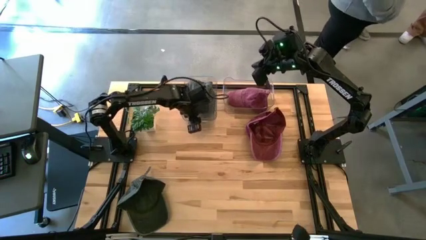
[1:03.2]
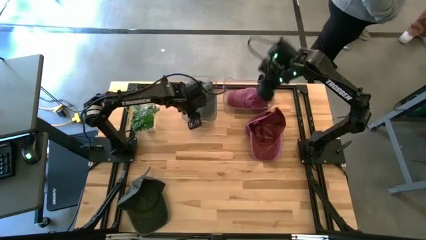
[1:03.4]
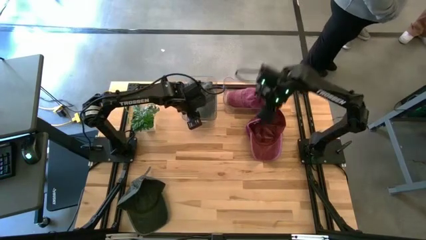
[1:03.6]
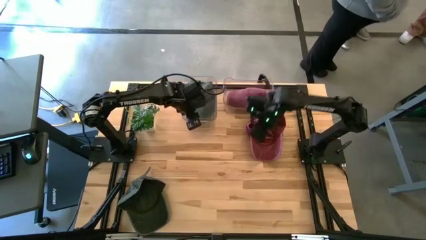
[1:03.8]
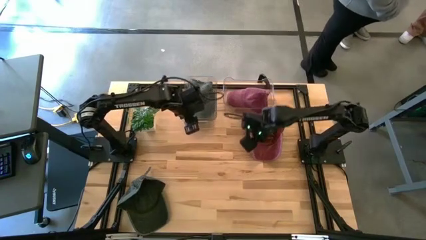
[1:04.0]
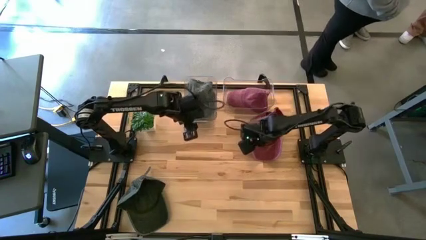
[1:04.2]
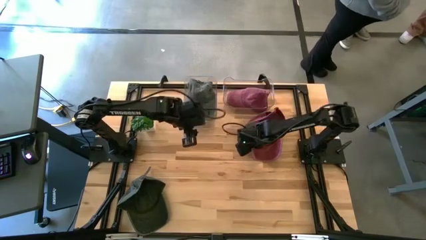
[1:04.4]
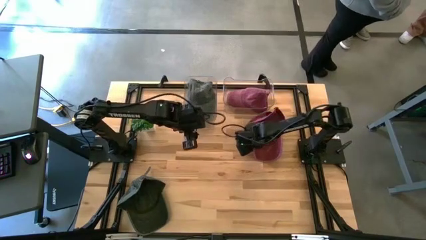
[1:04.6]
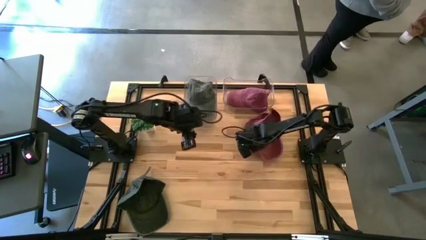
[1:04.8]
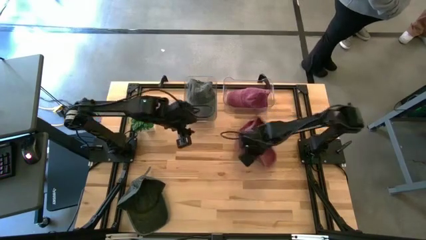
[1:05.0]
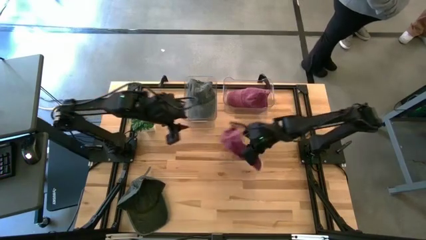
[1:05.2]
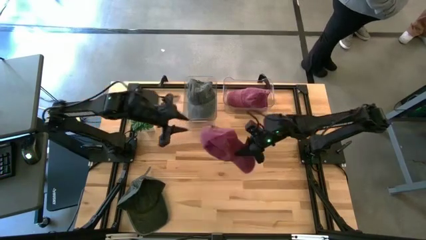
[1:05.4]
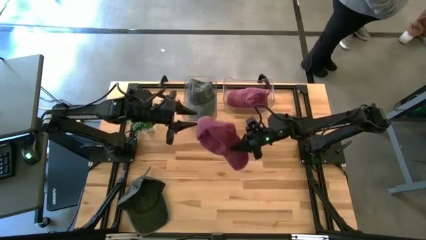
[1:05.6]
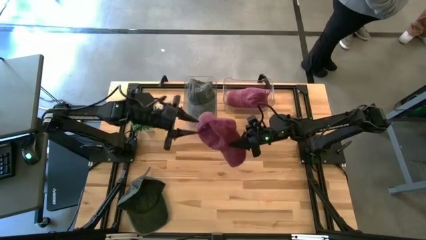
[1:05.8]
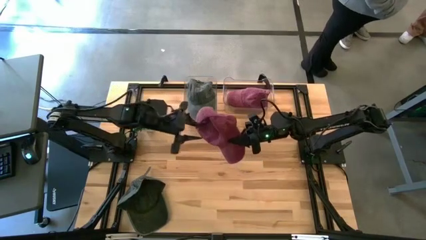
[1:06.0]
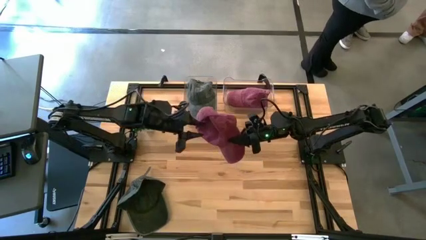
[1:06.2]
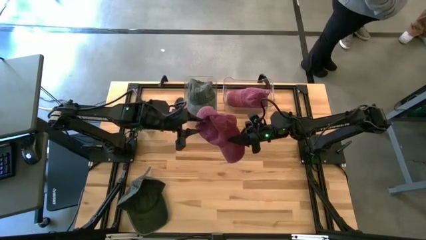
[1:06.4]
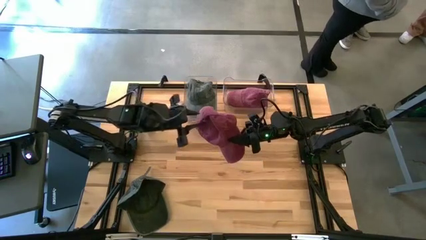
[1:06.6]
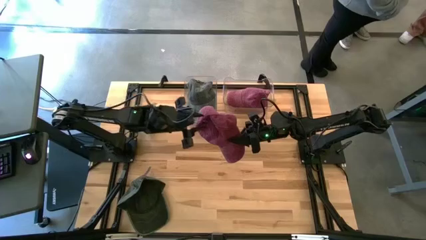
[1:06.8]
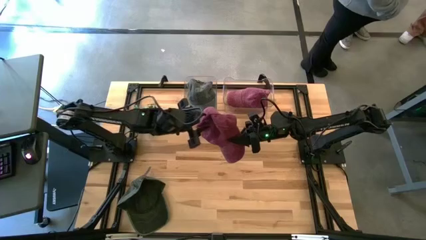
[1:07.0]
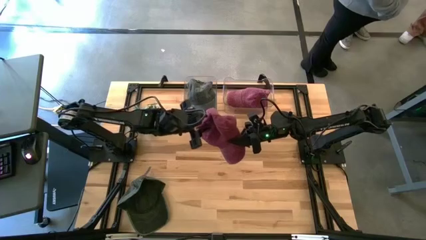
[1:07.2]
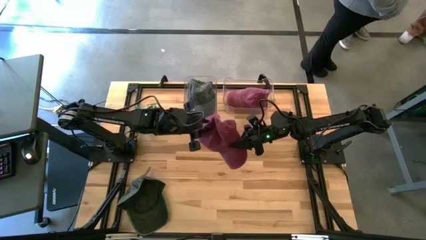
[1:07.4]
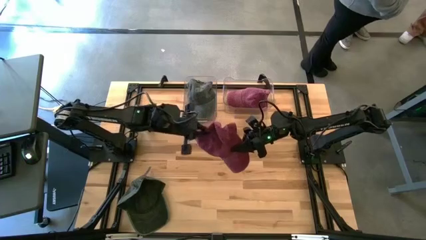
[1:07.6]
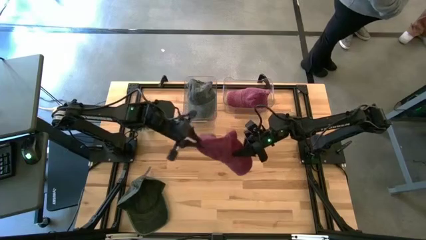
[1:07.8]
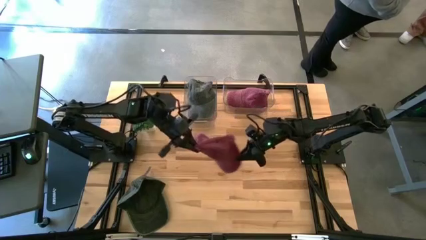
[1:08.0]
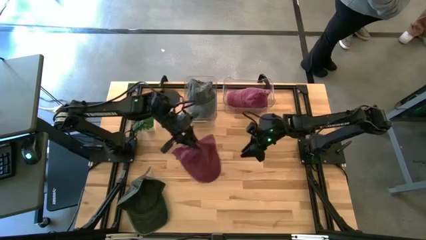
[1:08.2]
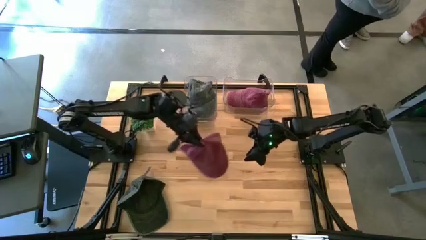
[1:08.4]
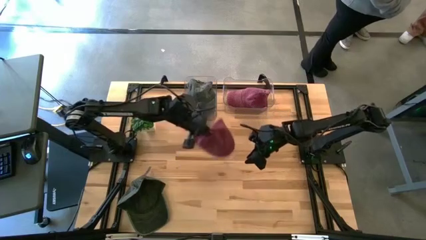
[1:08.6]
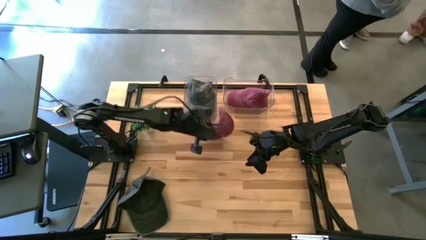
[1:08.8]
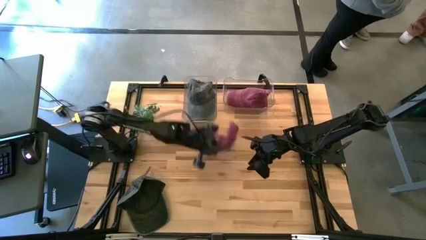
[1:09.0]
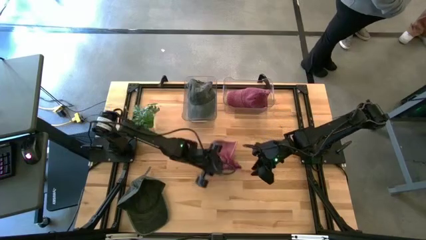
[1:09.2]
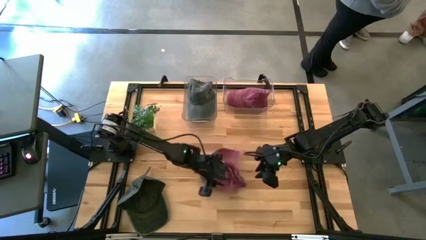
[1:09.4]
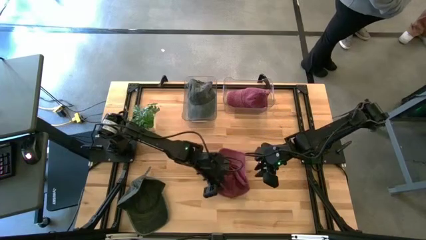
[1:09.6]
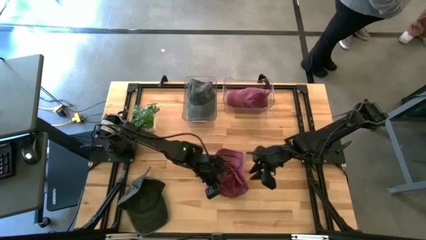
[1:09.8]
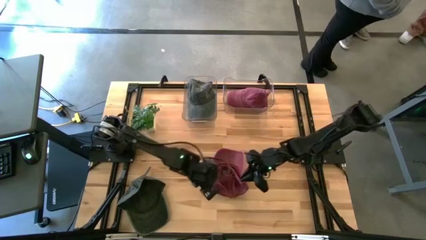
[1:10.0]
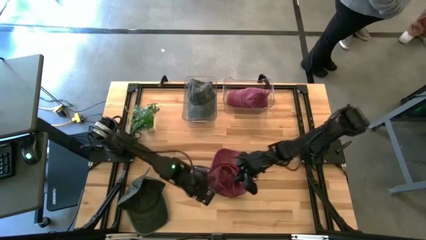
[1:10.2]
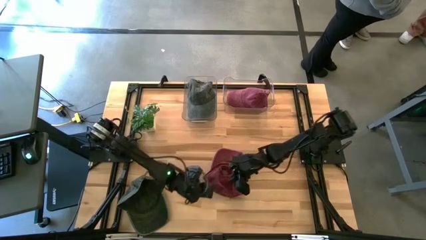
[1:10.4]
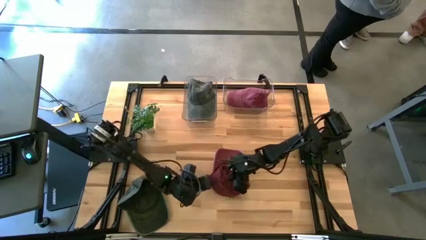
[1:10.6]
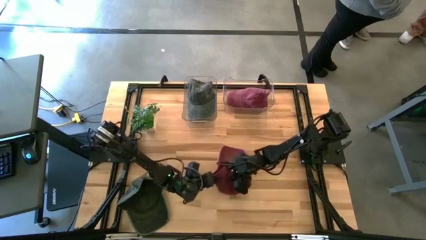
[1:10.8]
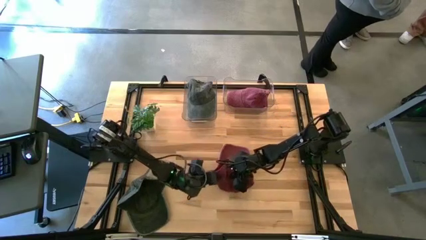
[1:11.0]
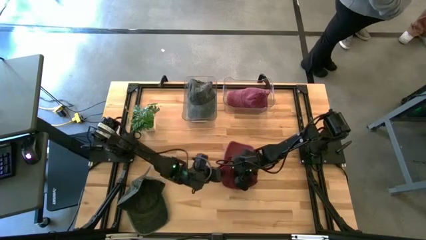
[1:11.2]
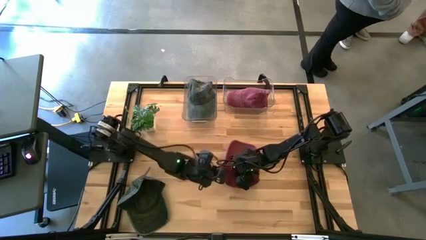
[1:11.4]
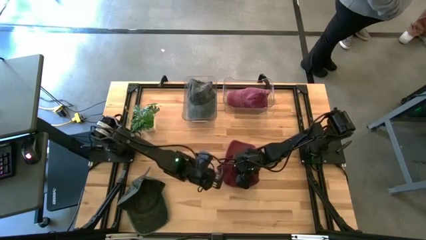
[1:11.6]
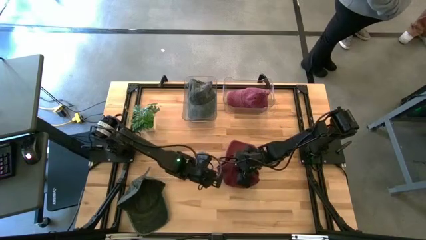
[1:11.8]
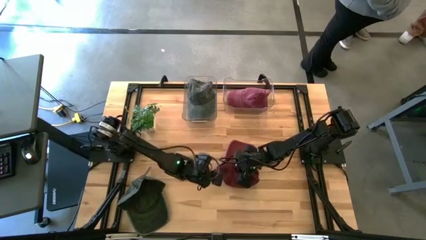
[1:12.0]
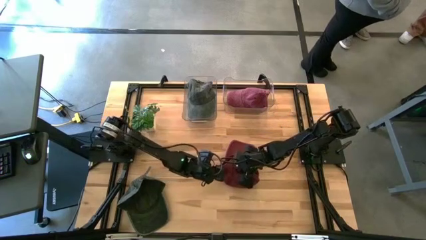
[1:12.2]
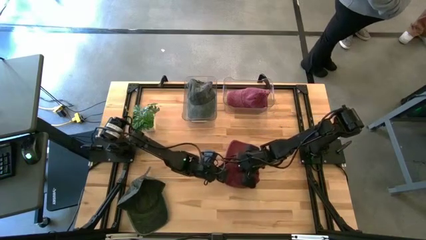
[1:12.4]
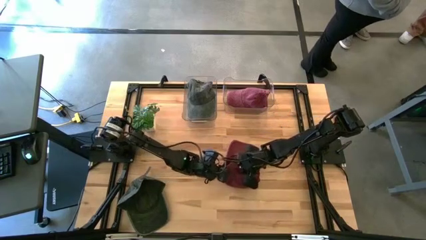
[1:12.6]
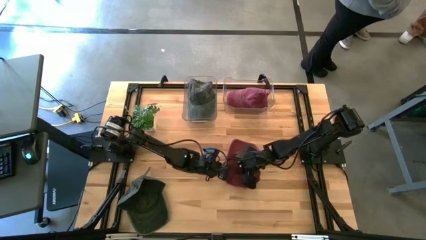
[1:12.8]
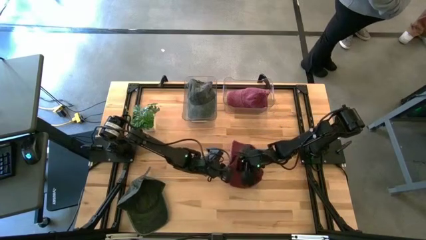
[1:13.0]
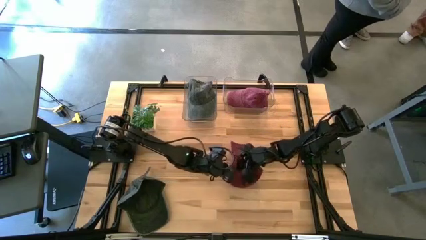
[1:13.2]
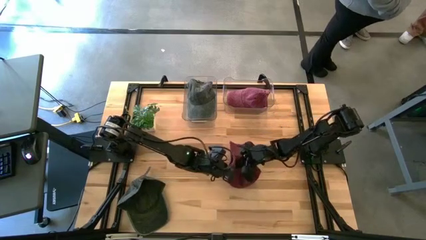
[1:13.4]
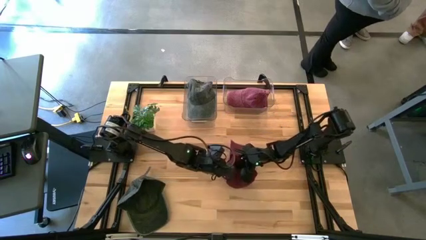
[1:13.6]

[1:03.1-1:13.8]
Task: Pick & Place hat
Put the red cap into the right transparent bin

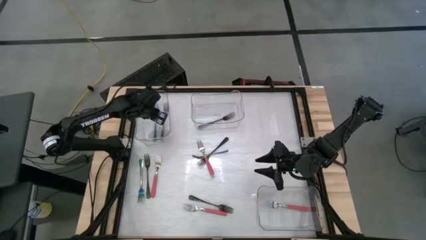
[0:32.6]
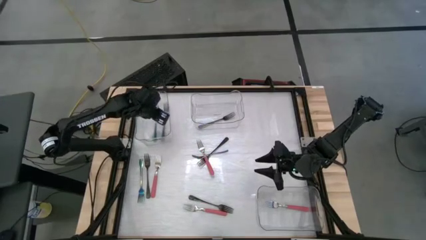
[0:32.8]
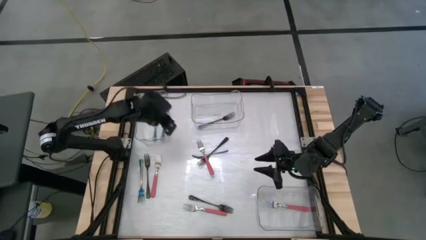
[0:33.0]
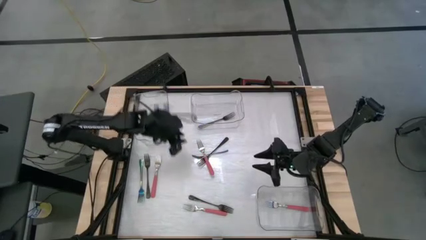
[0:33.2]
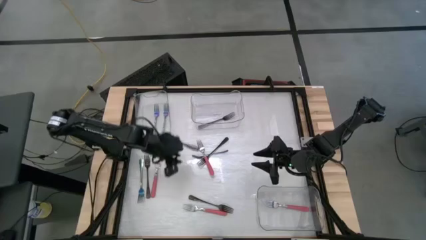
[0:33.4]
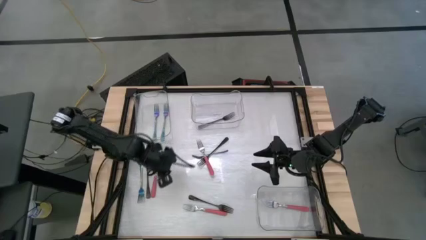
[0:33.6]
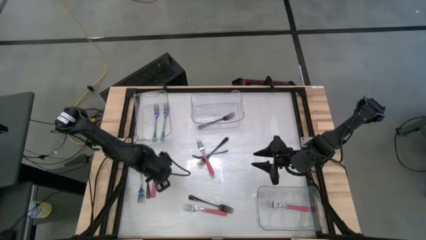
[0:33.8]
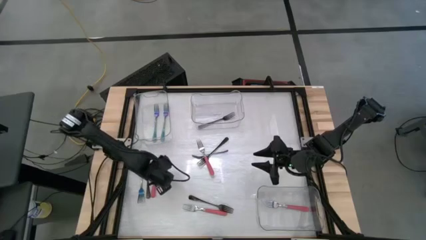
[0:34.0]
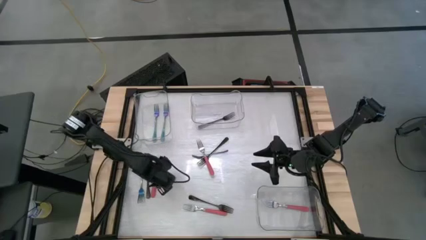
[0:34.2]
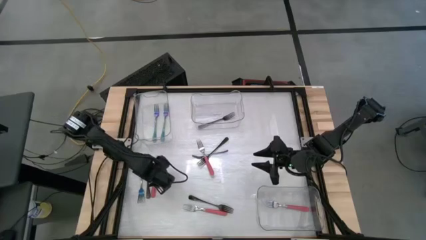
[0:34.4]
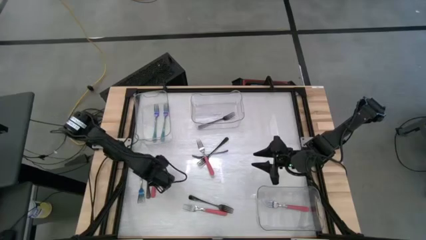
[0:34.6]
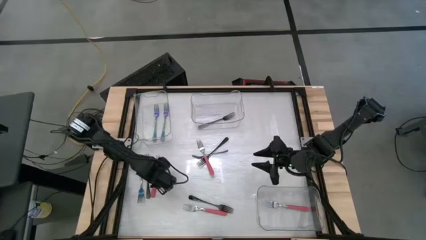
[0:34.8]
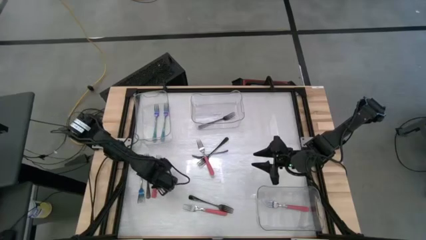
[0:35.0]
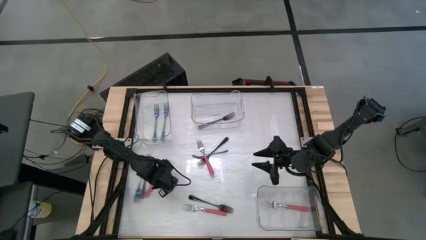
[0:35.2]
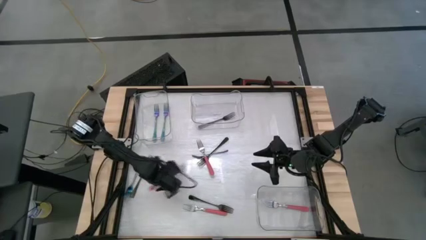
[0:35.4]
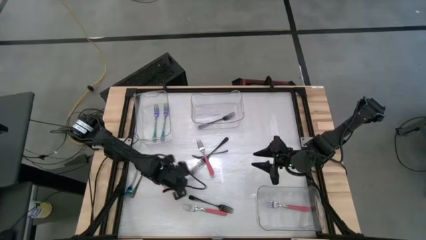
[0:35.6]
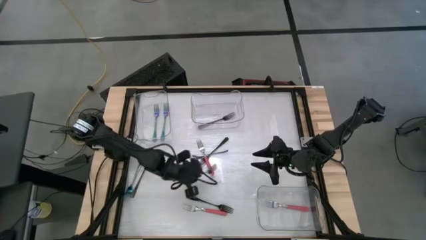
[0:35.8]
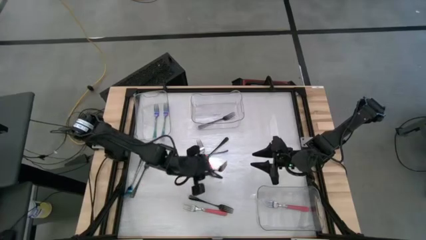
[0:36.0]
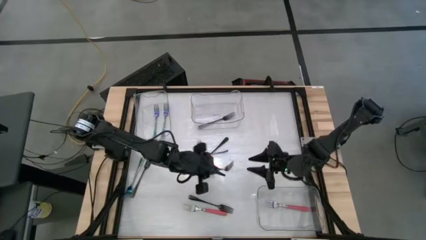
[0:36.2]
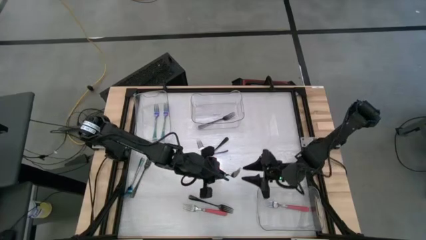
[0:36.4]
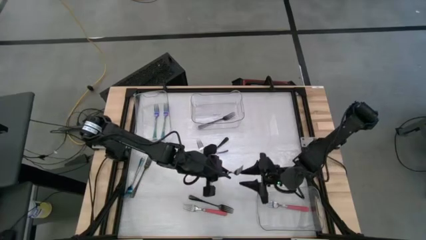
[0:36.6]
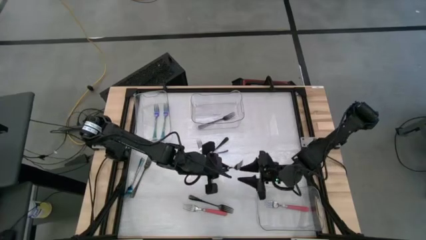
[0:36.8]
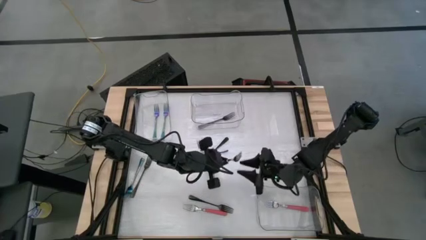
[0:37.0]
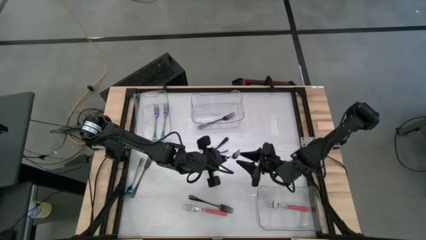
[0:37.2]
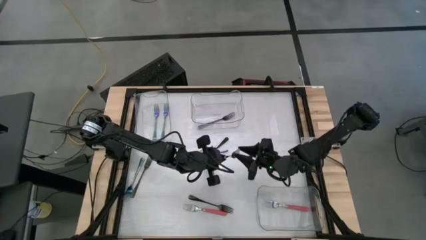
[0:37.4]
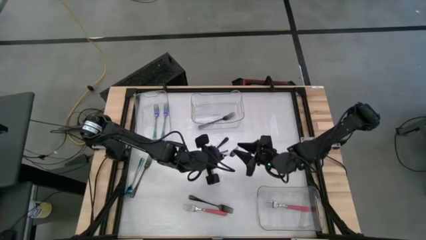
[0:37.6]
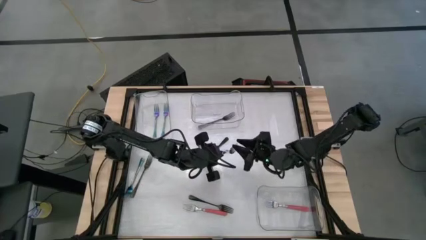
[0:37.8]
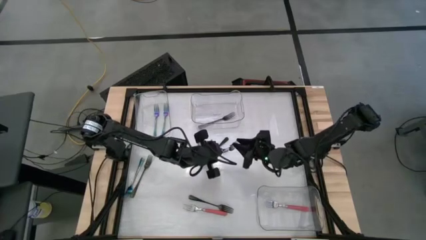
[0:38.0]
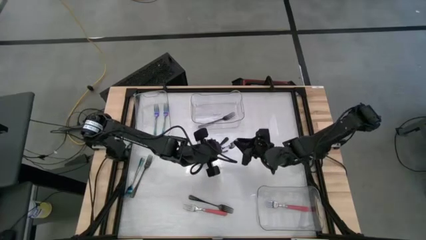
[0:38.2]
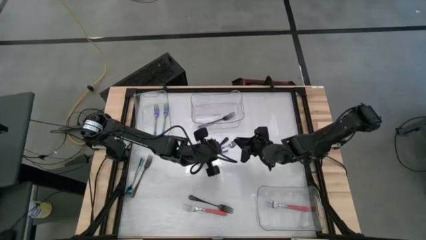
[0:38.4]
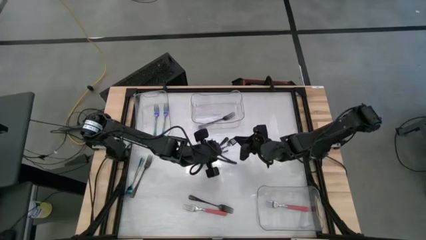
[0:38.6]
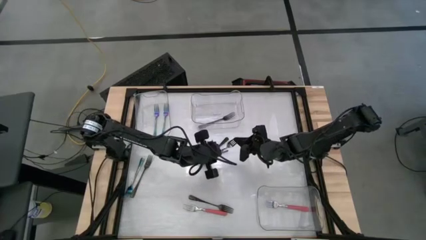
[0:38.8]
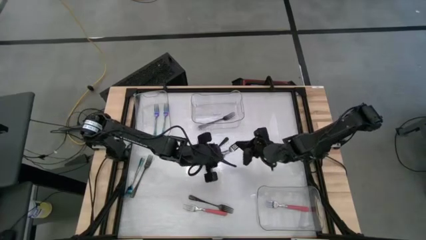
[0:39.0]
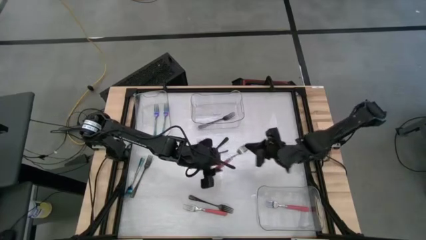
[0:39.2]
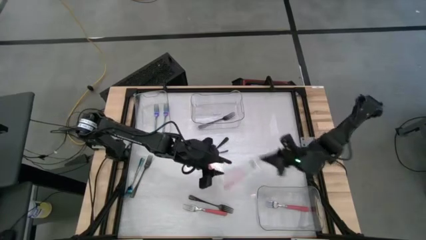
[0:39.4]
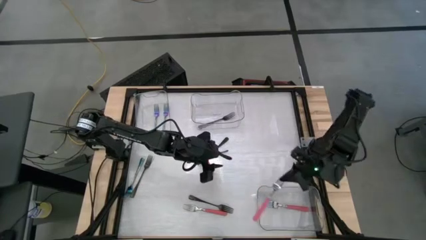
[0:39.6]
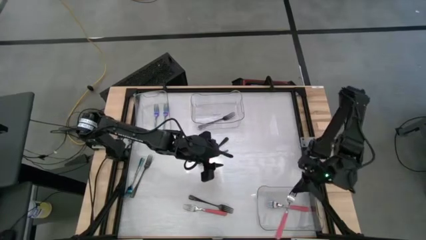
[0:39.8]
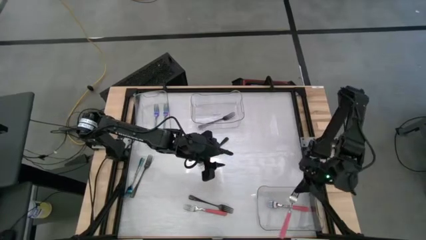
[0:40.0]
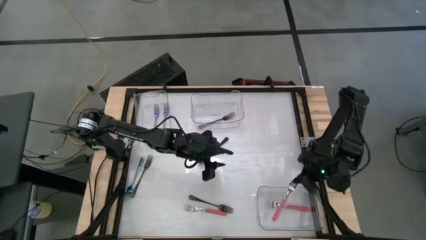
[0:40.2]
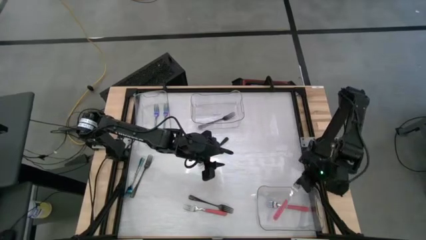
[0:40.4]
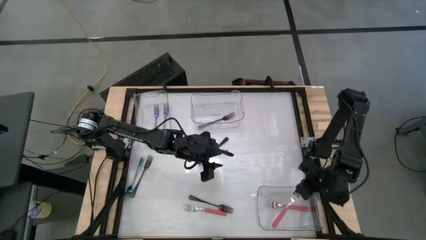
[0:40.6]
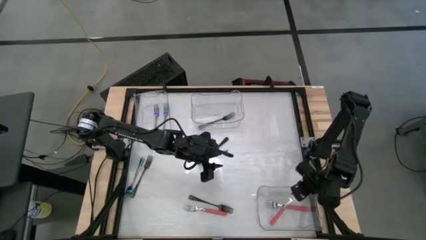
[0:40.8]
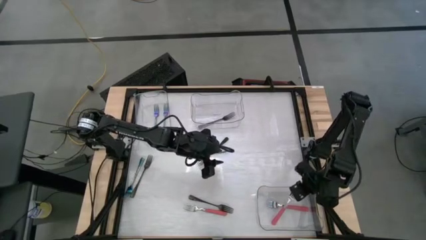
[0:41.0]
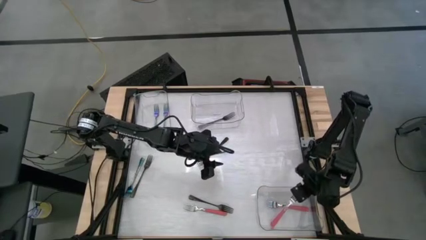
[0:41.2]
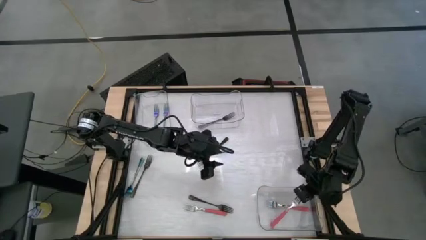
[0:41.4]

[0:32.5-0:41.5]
Task: Sort silverware by color (type)
Put the pink fork into the bottom right transparent bin
